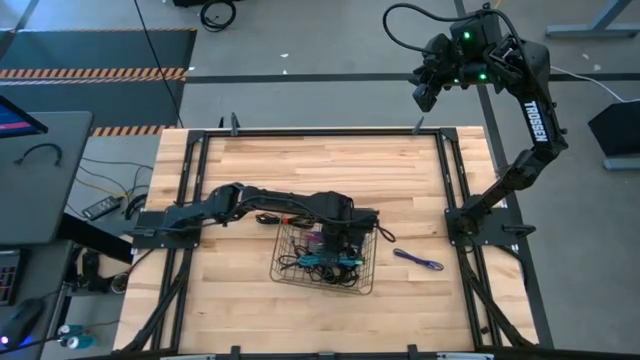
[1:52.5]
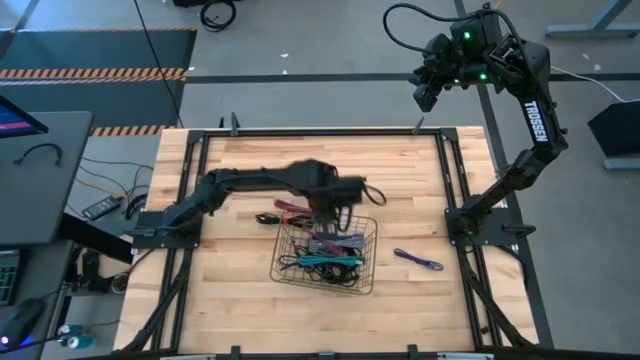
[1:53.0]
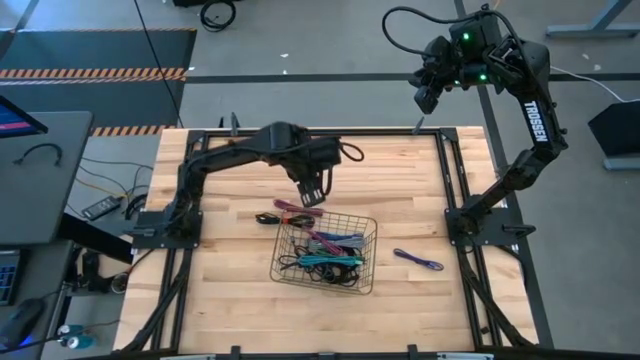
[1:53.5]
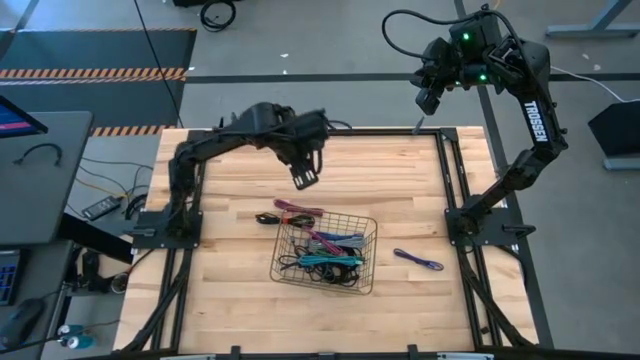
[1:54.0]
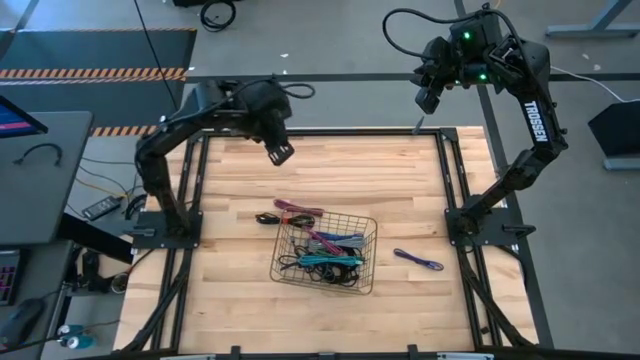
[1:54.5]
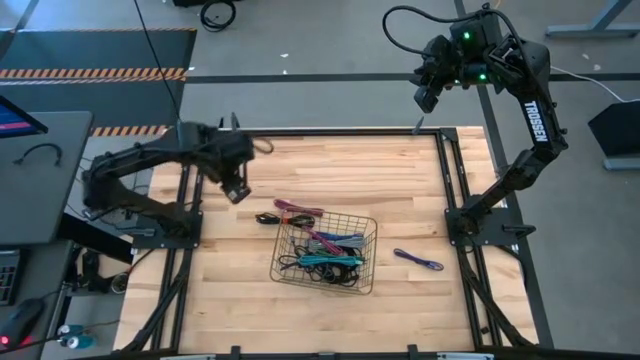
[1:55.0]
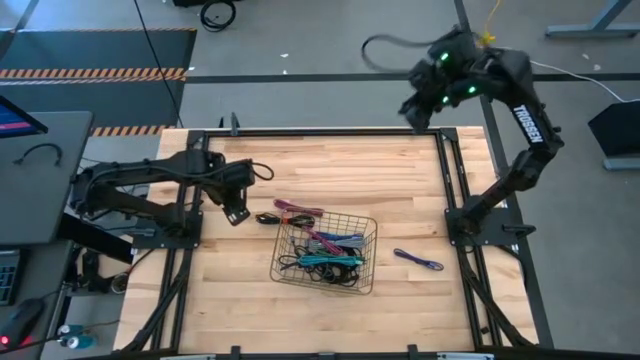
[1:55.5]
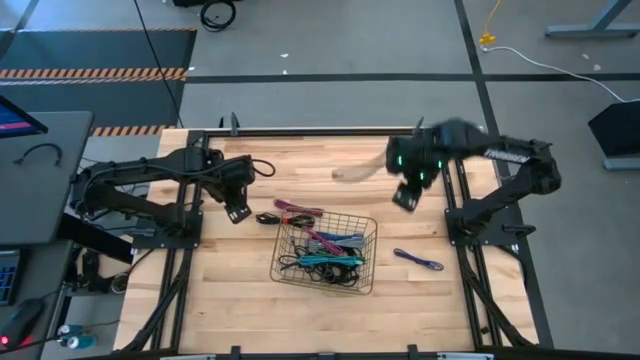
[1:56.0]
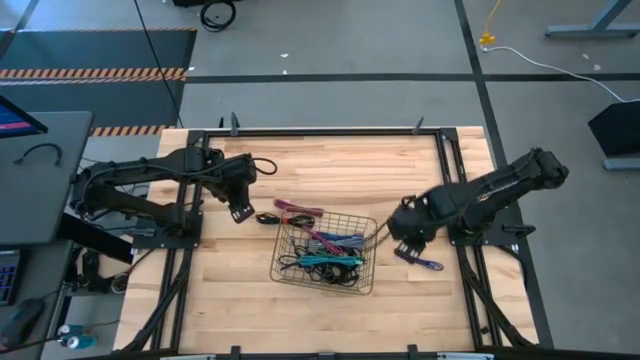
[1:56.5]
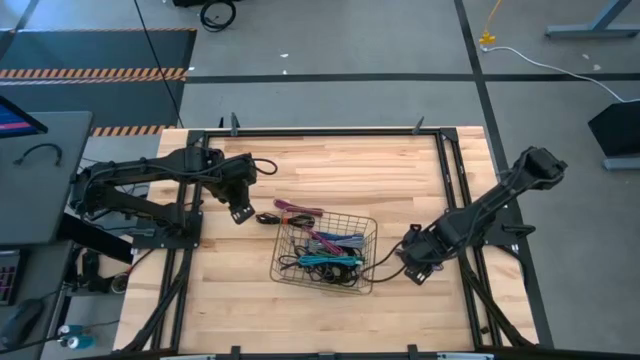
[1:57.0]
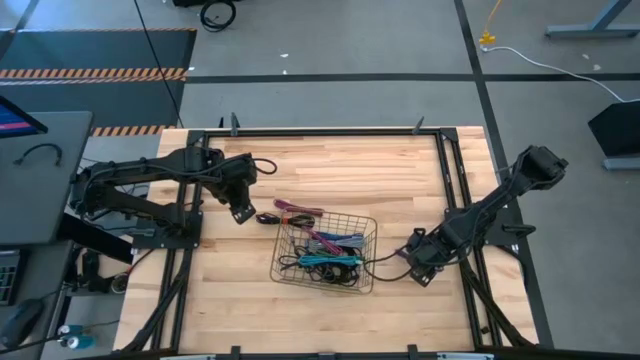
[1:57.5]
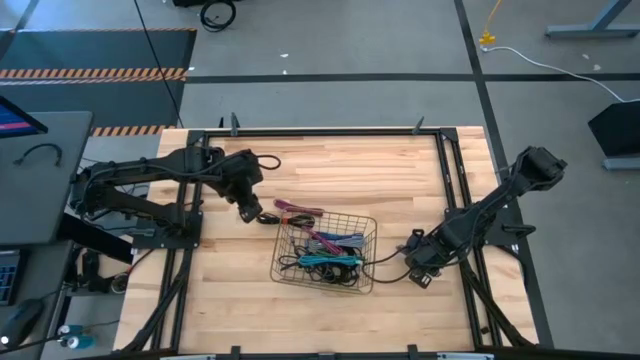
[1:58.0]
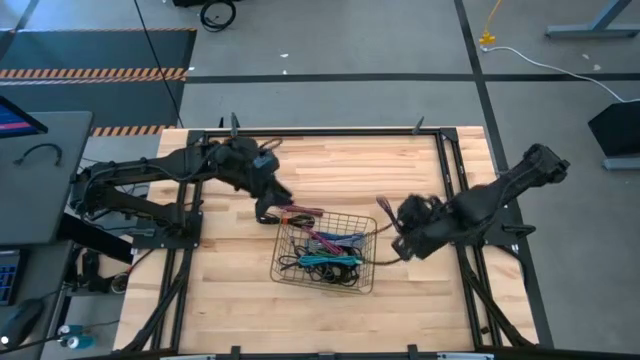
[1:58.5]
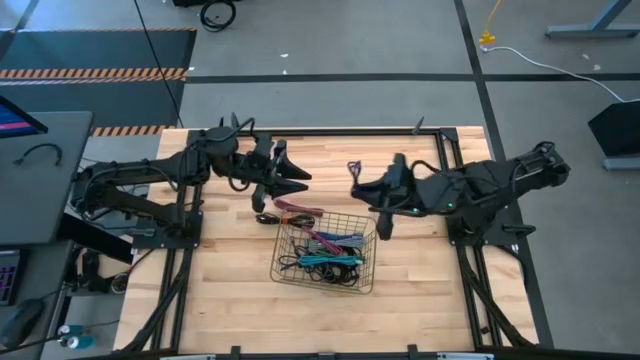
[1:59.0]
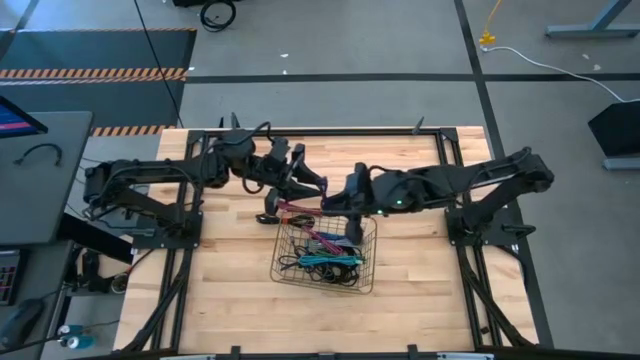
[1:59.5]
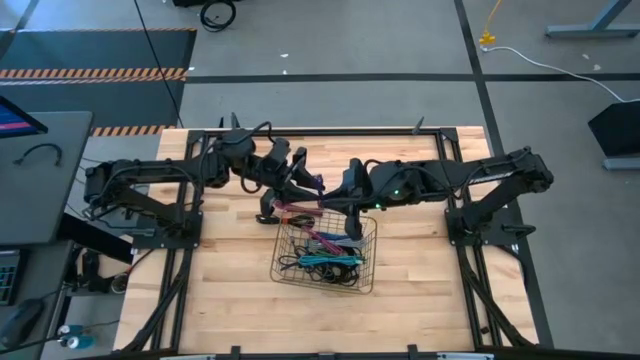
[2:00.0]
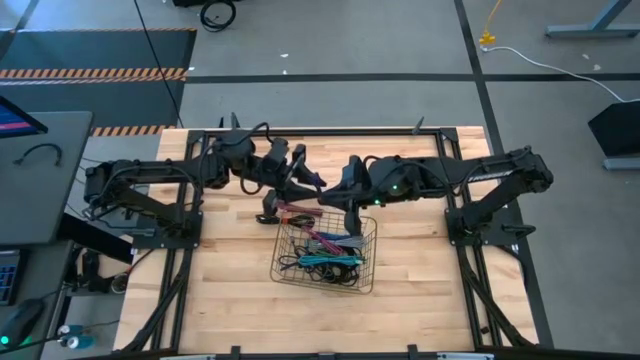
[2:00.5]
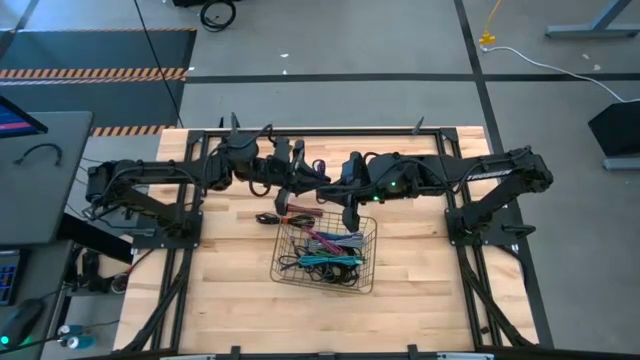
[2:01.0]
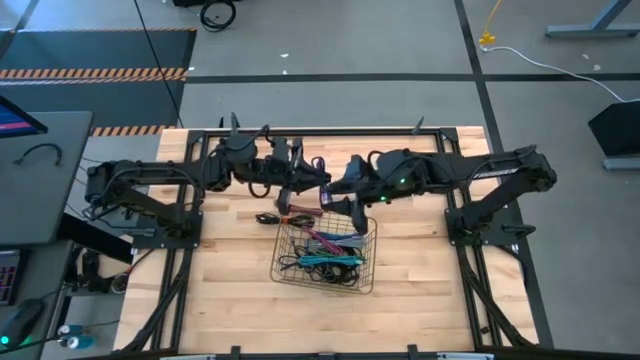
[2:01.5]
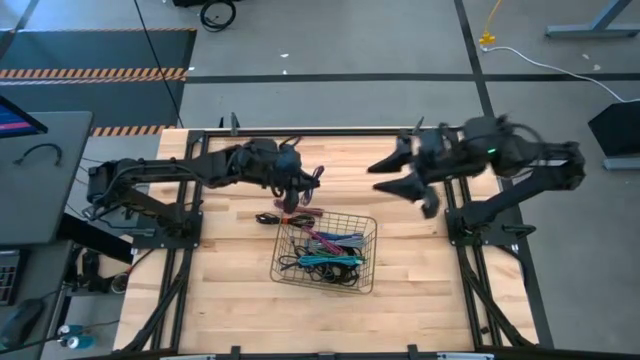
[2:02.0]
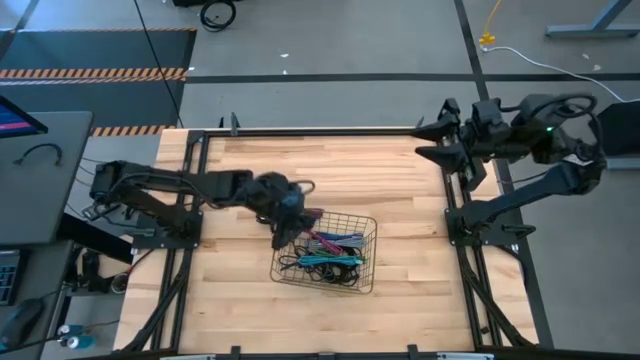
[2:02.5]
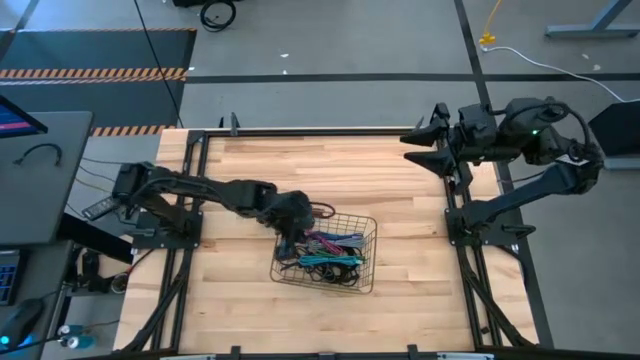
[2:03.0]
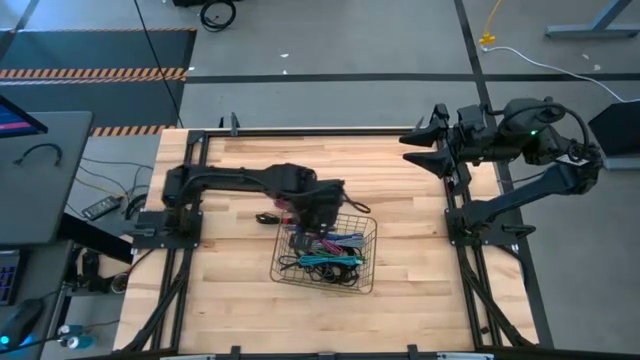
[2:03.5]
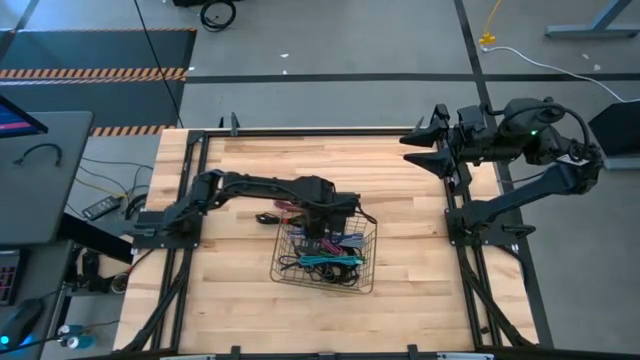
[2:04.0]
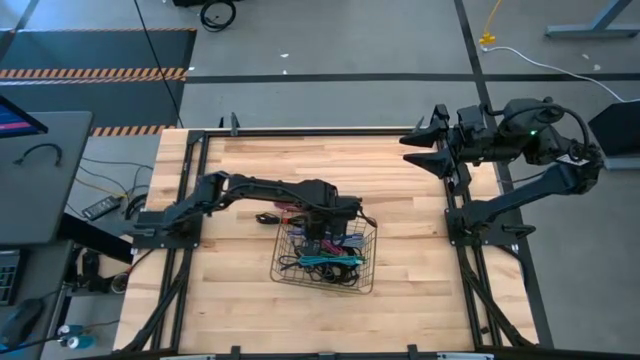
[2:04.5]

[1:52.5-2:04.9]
Task: Pick and place USB-C Cables
Put the purple charger cable into the wire basket

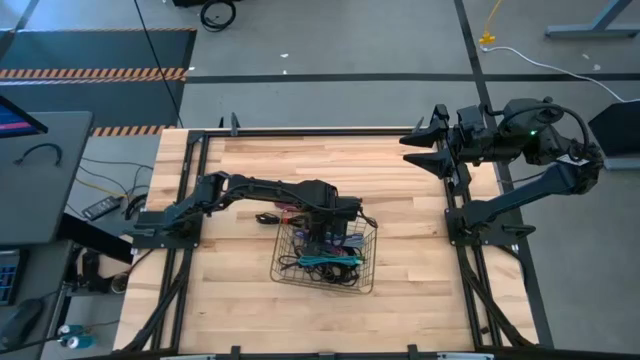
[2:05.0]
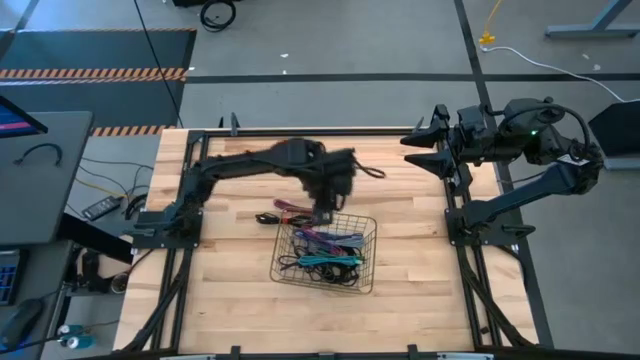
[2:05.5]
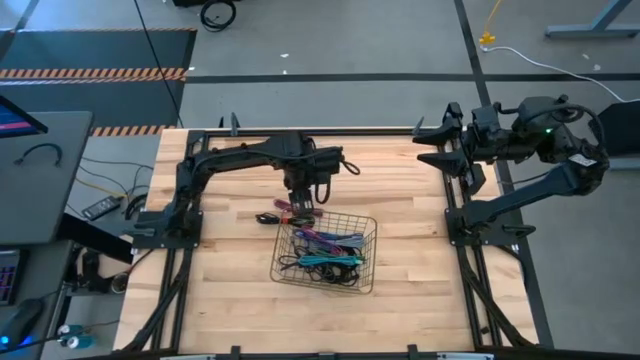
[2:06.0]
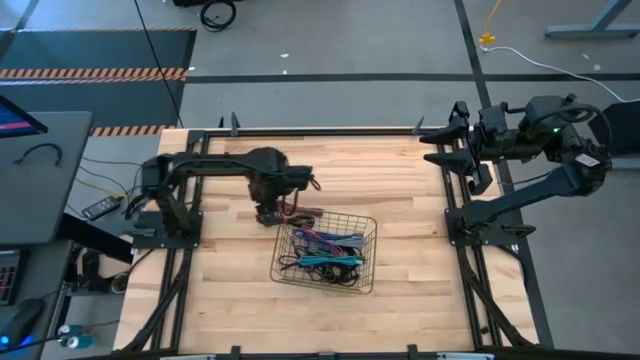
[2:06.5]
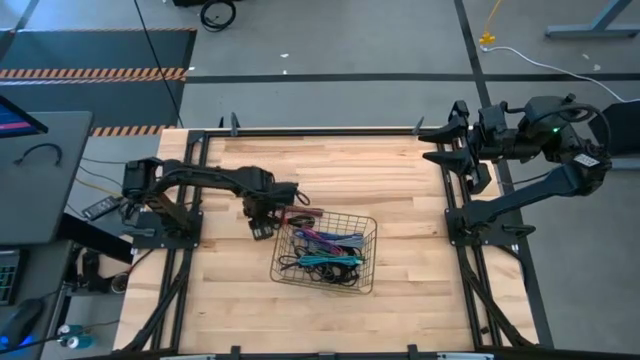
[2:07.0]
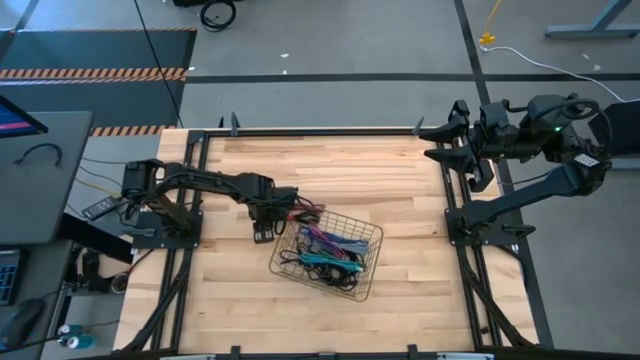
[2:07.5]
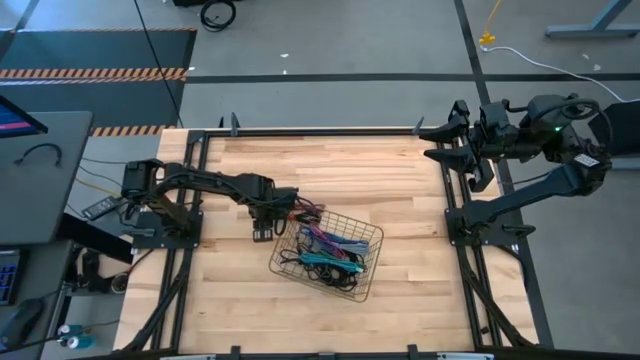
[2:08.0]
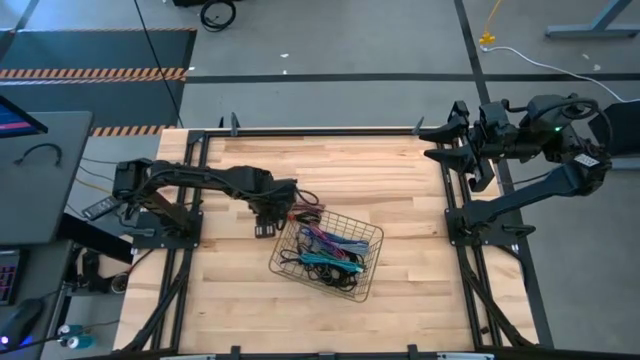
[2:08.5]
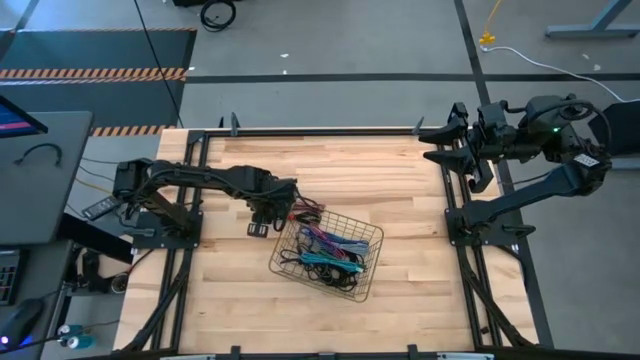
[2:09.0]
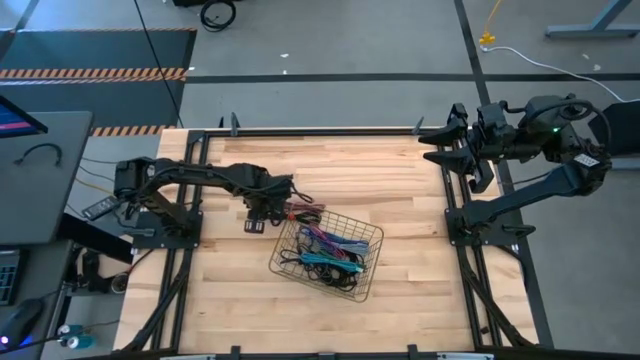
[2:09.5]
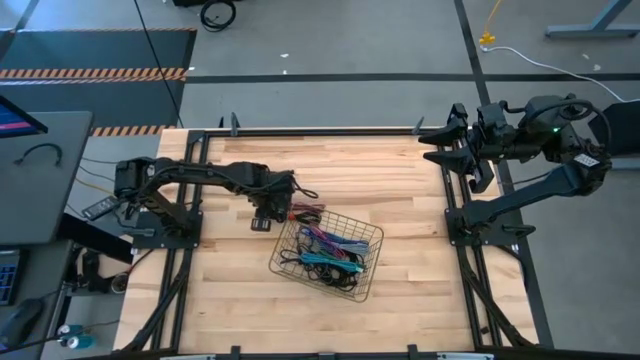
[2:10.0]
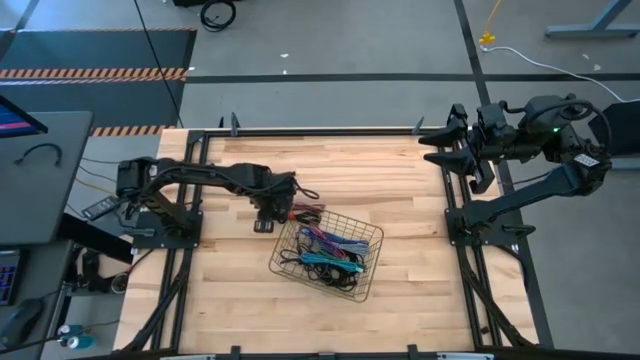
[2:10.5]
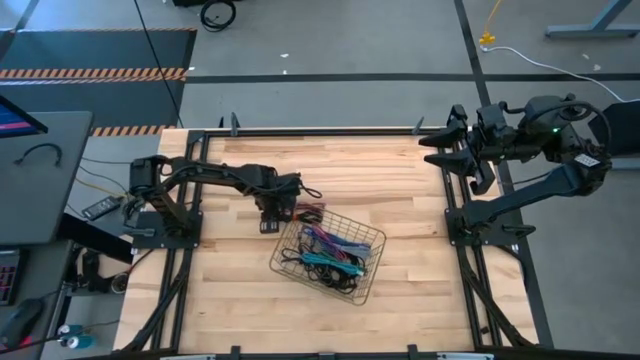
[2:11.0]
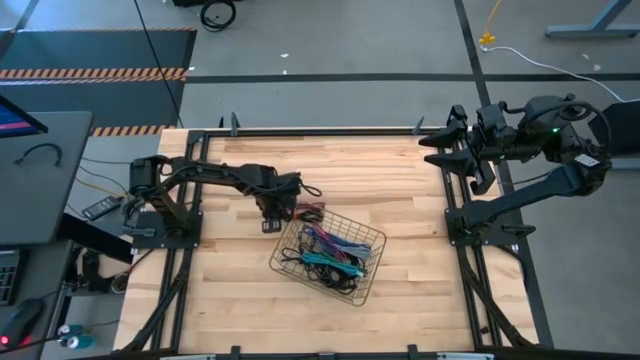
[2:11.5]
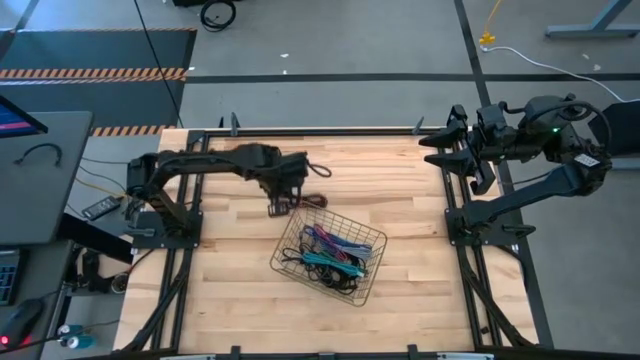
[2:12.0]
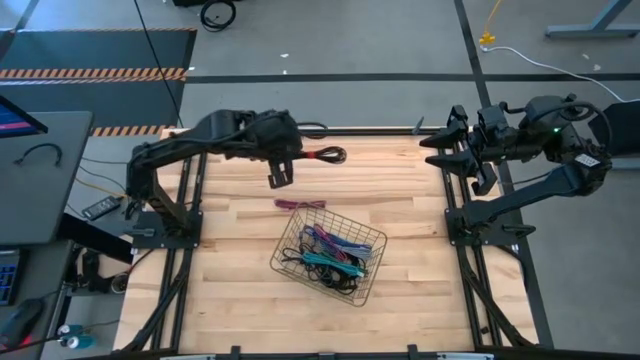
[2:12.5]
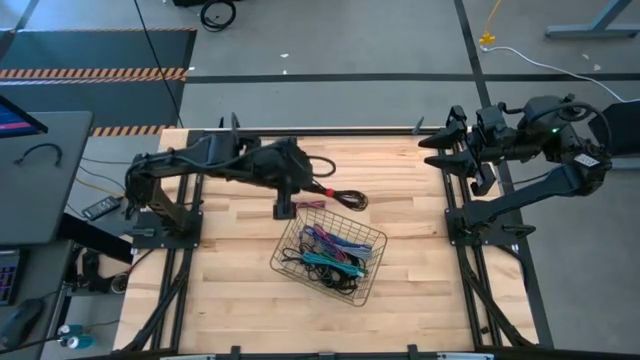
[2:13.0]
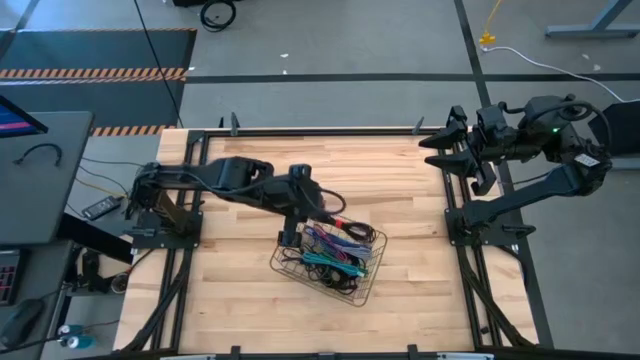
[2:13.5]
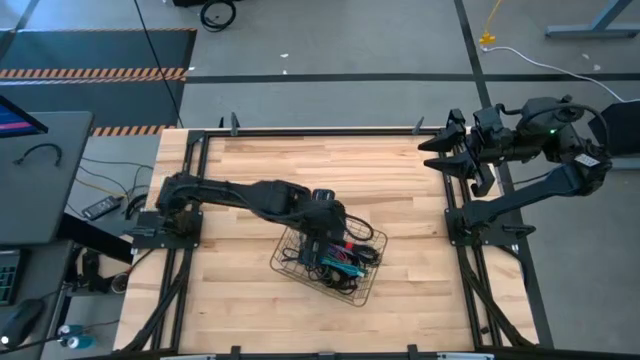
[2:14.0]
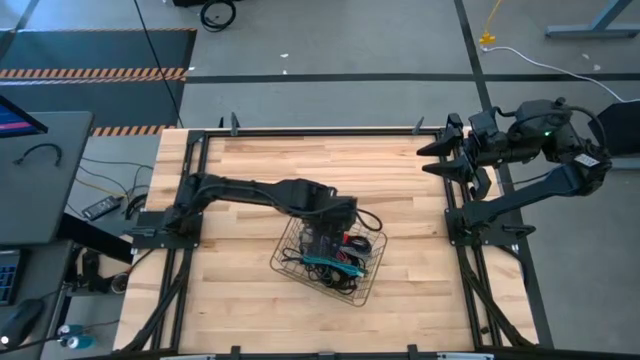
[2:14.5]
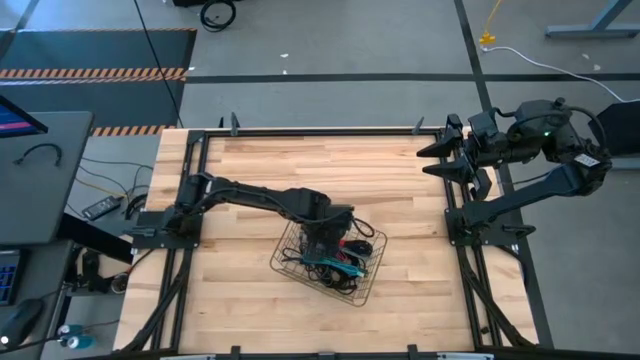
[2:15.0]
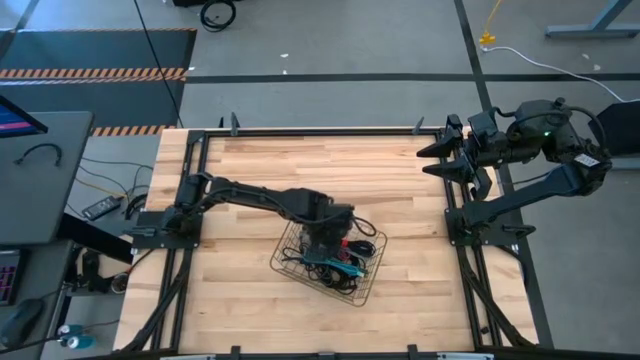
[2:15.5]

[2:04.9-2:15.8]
Put the black charger cable into the wire basket
